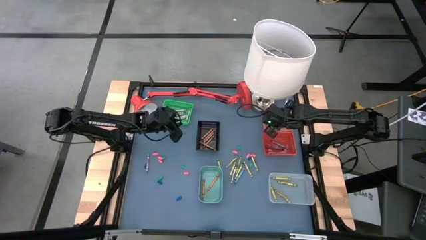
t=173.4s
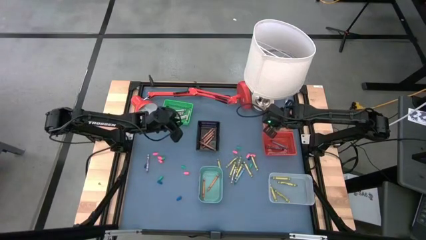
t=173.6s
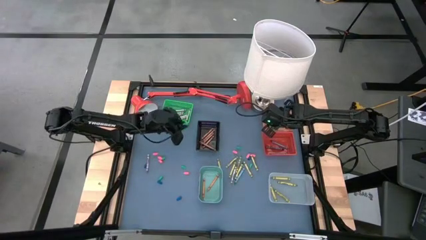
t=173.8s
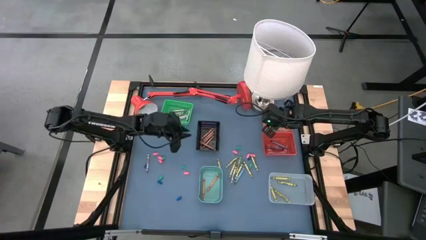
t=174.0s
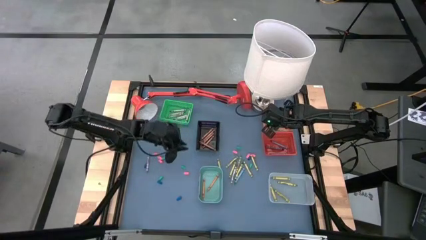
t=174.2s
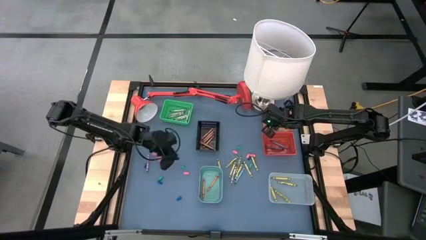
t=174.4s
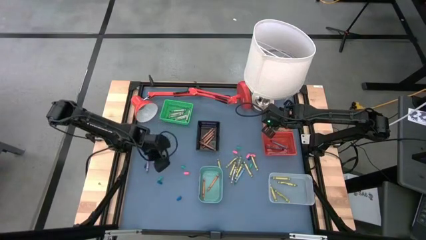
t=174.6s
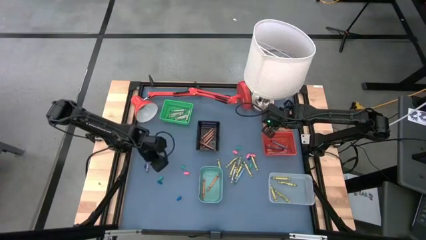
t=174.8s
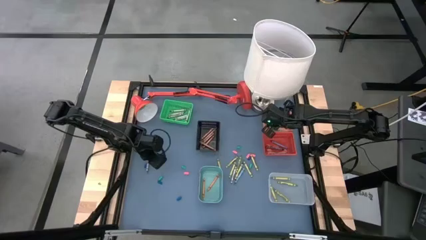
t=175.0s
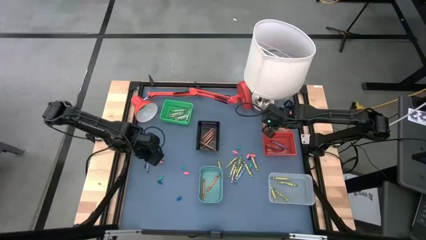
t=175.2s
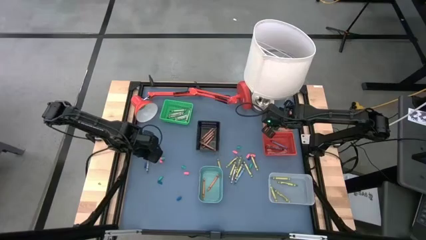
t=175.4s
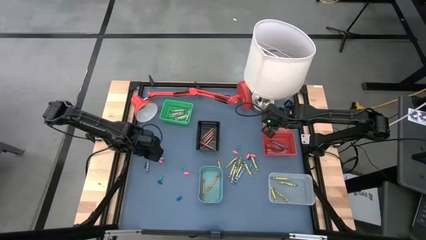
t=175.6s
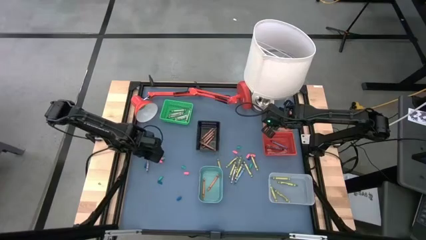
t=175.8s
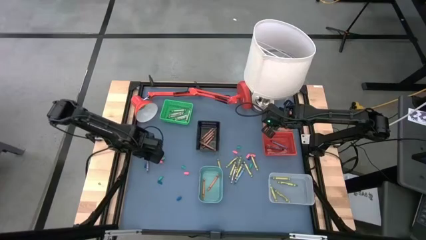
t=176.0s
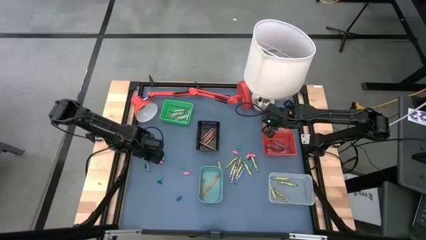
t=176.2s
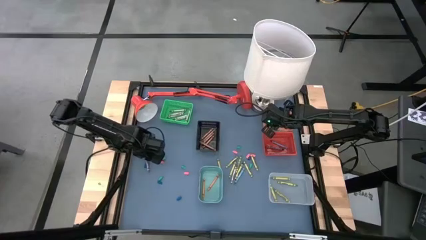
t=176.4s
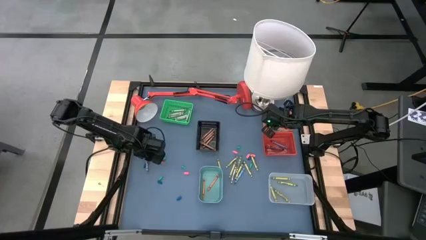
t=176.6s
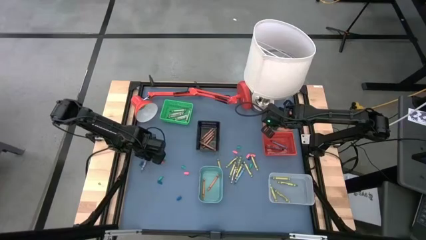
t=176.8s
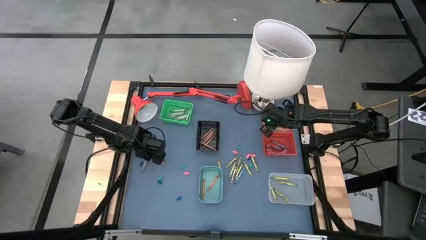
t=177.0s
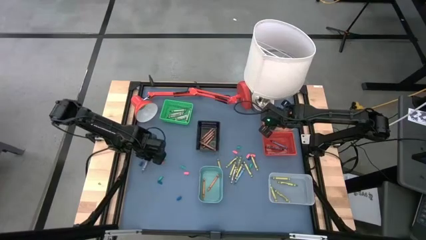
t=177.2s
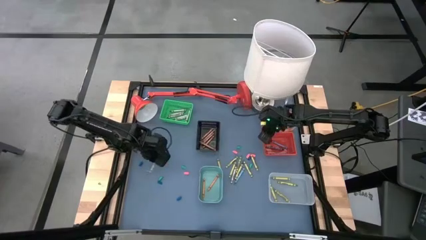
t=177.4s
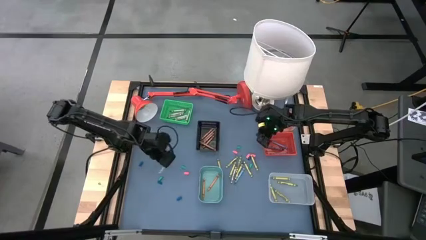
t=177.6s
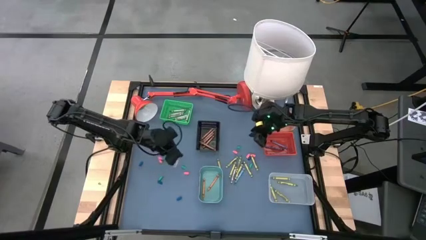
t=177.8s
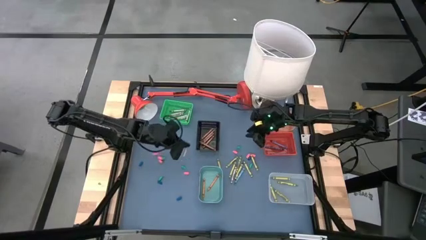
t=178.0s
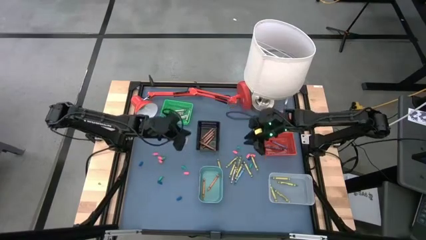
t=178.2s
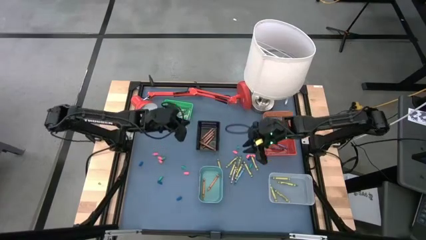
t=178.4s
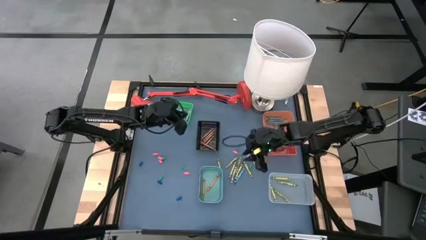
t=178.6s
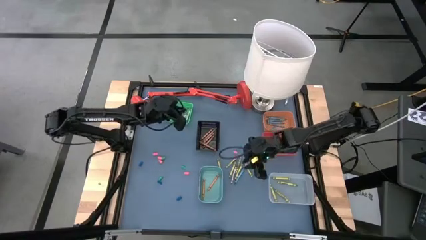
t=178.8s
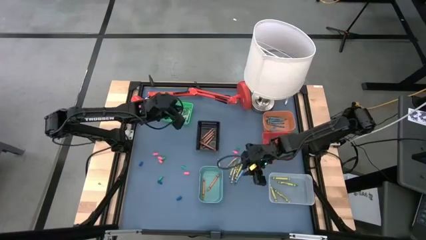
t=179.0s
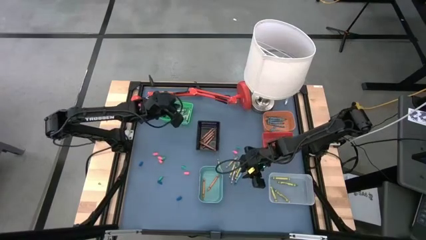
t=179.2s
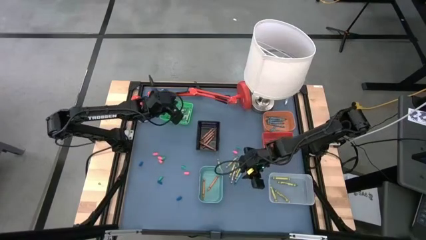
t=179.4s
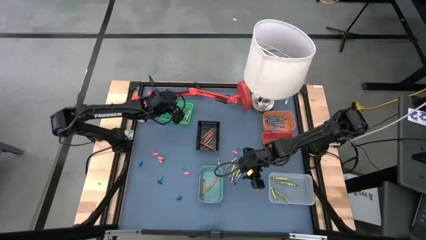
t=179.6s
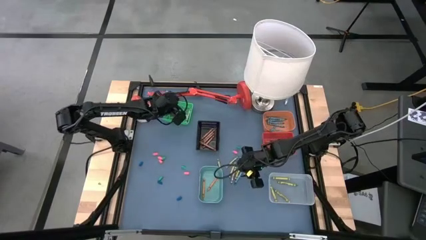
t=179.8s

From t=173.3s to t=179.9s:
Task: Sort crayons
Put the gray crayon into the green bin

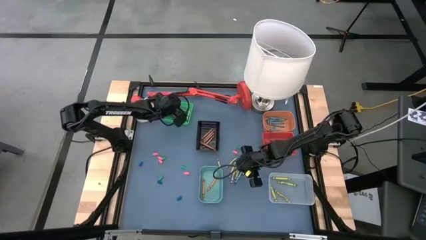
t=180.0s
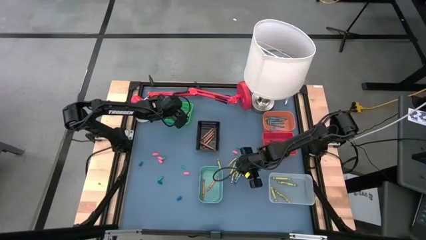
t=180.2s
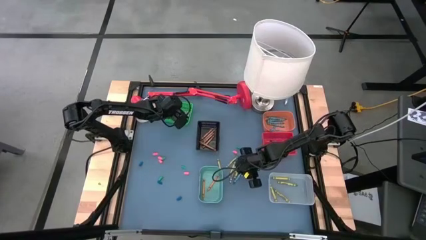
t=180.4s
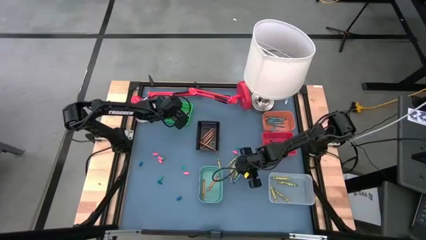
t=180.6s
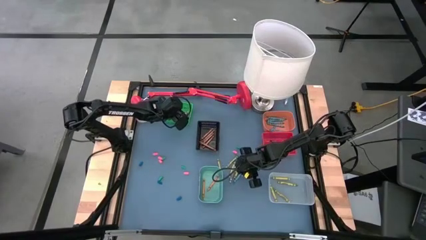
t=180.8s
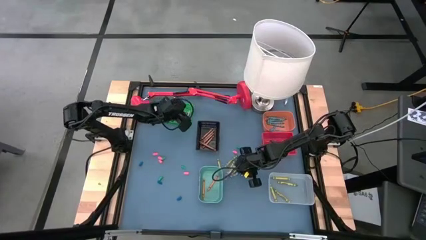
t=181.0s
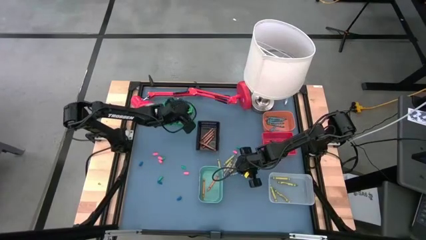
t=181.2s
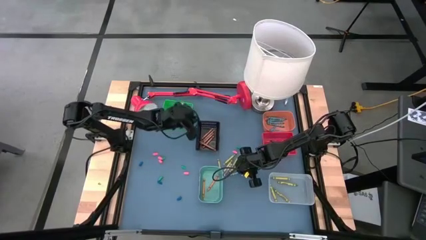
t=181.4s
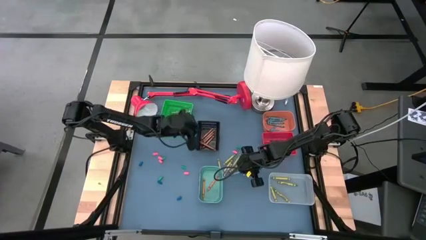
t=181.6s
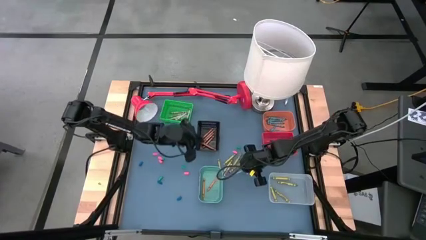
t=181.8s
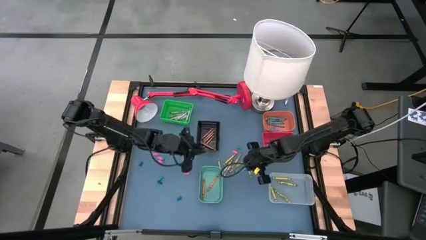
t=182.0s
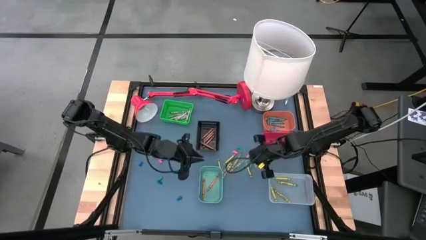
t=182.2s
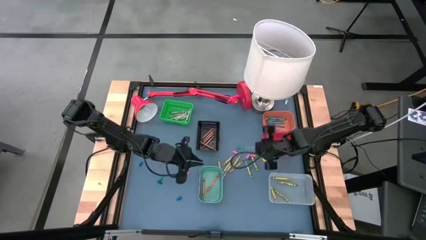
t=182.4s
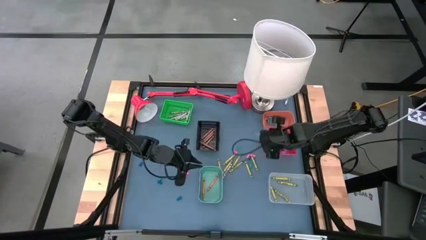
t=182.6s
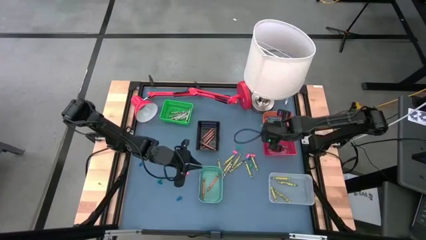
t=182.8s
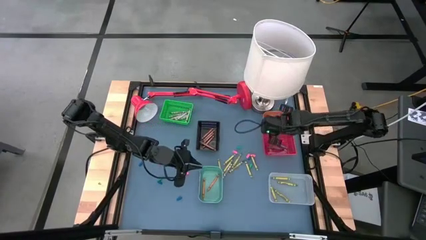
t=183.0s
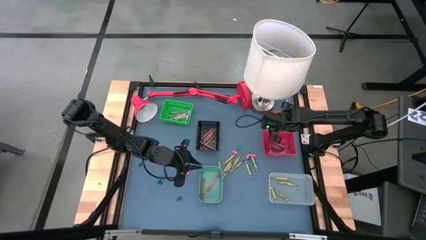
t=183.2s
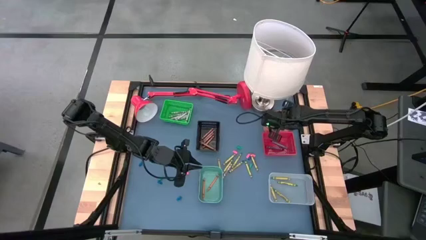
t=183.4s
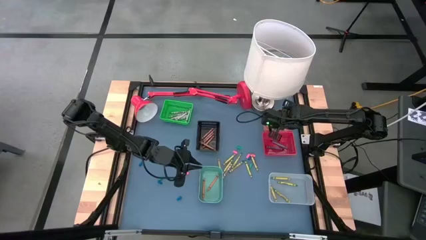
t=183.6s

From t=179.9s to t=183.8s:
Put the blue green crayon into the orange bin

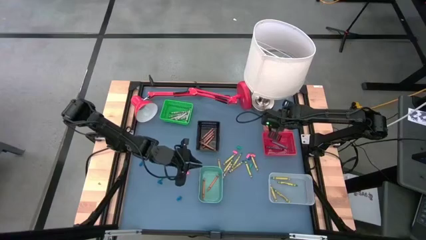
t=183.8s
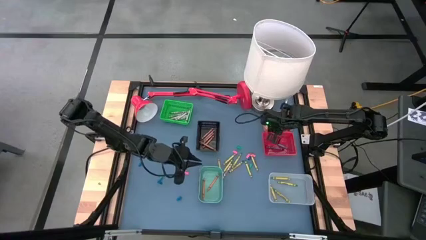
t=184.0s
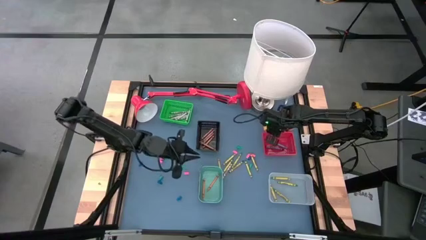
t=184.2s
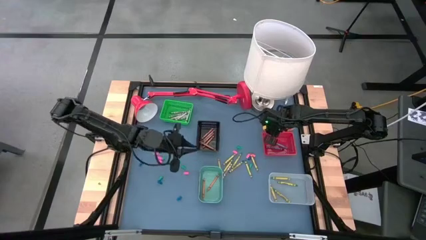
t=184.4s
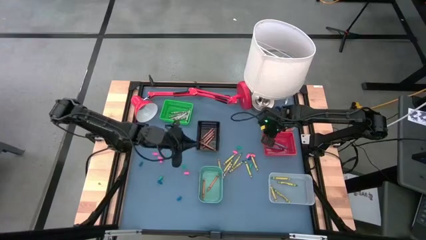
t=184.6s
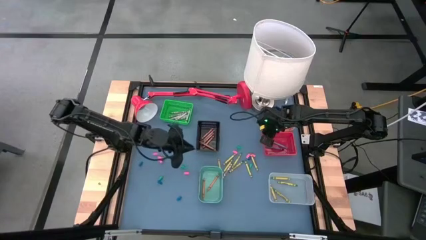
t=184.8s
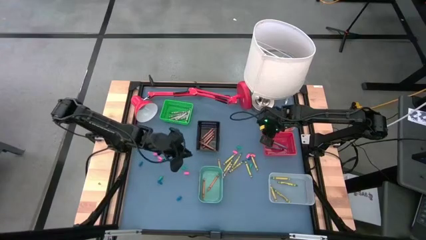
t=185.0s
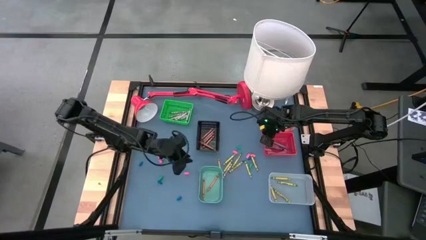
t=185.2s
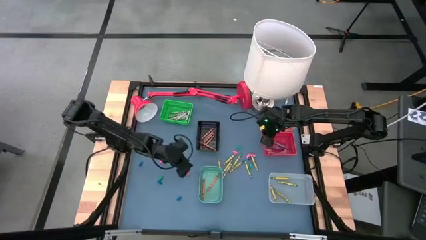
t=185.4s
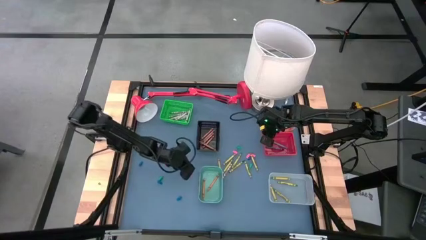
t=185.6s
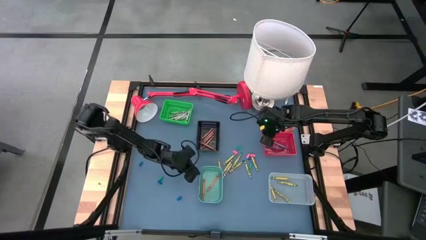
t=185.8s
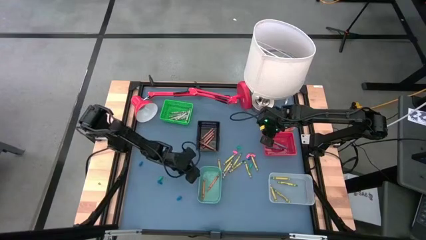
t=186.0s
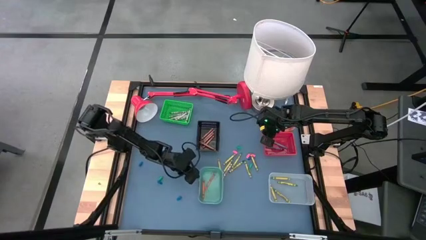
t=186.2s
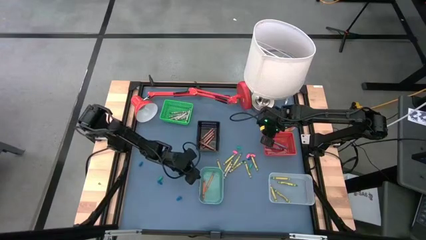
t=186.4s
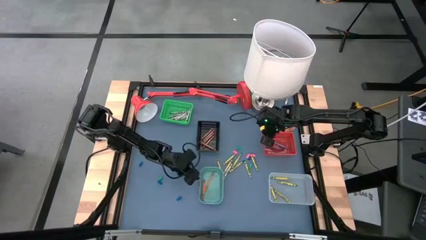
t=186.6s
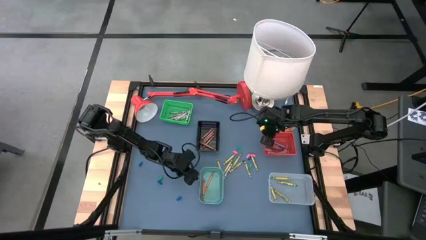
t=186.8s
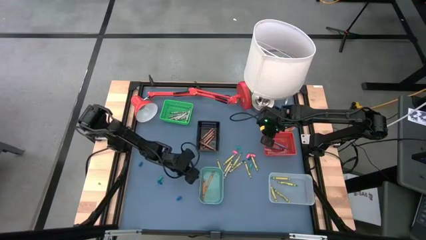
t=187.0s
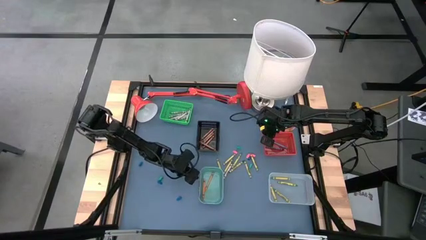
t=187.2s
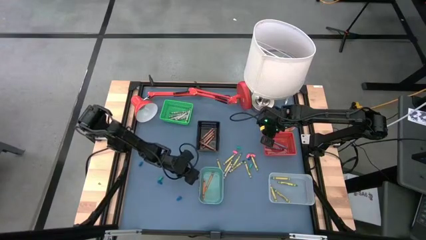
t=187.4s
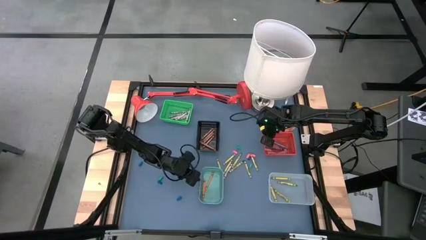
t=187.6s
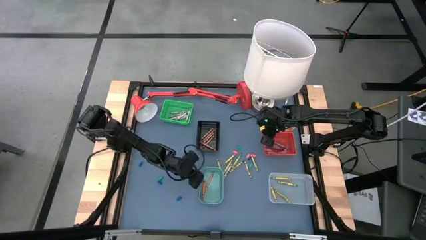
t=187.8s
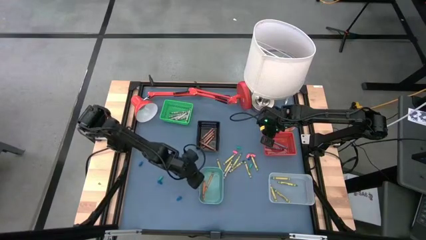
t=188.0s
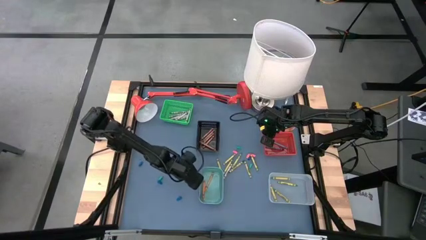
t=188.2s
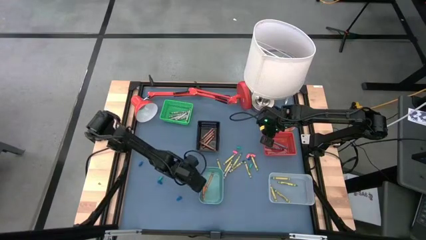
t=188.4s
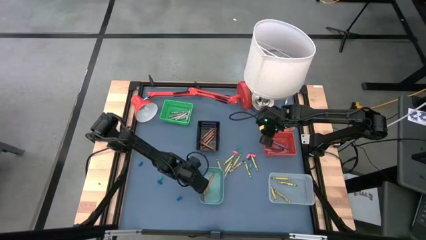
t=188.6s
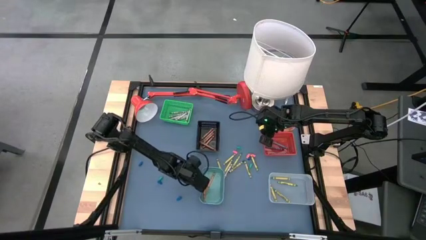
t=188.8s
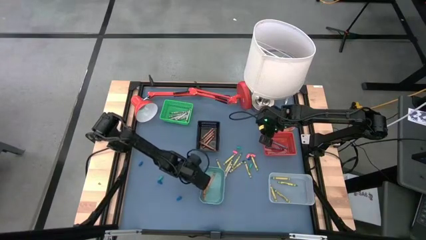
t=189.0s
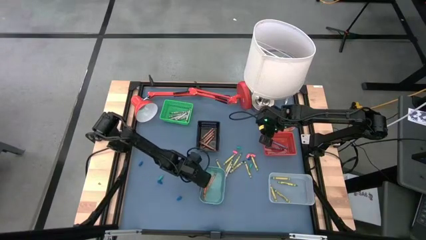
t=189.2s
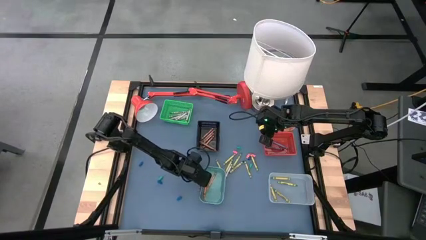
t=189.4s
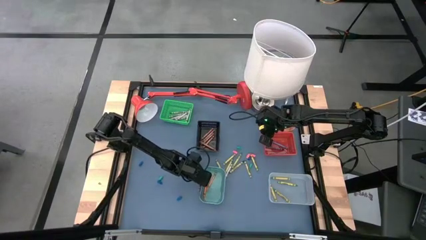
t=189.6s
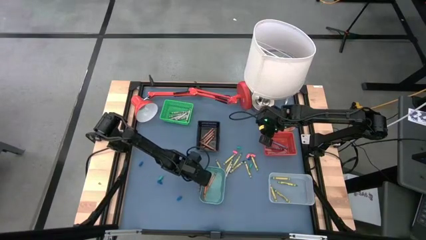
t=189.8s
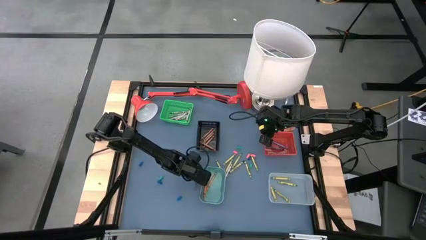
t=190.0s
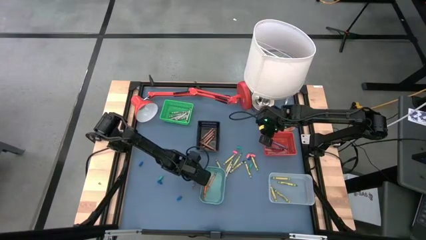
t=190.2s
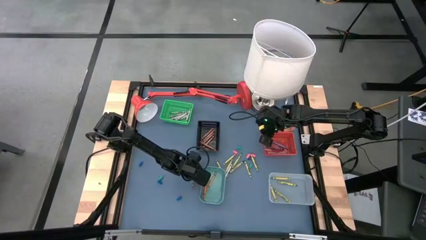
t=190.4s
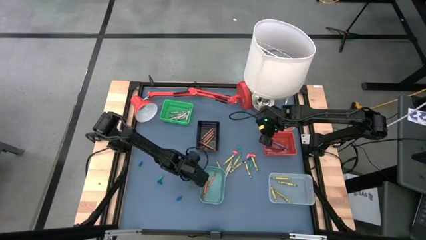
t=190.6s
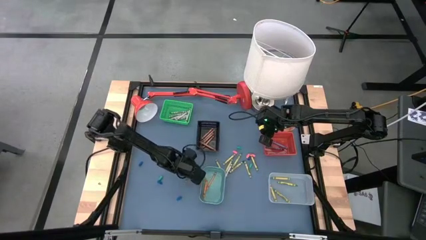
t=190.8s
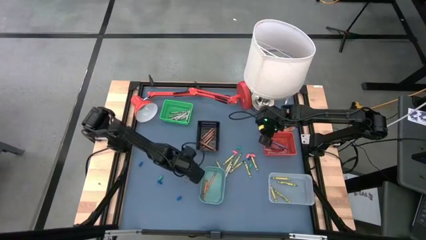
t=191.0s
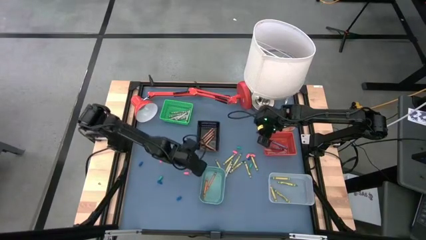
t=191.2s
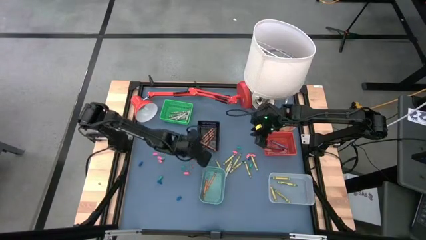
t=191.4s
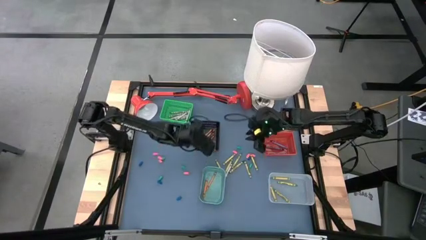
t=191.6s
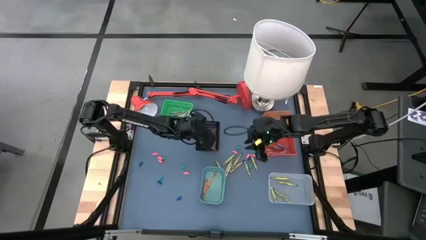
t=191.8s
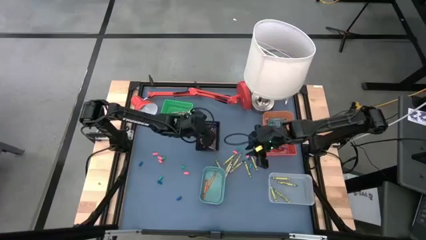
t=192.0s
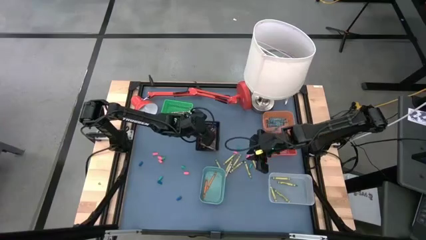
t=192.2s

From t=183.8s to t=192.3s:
Put the brown crayon into the black bin
